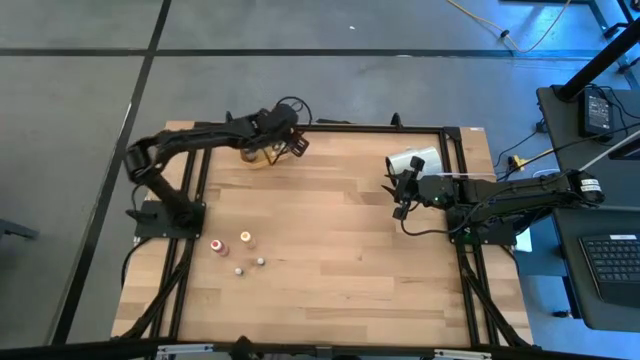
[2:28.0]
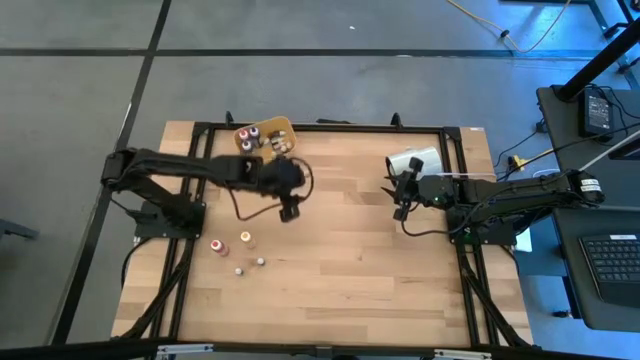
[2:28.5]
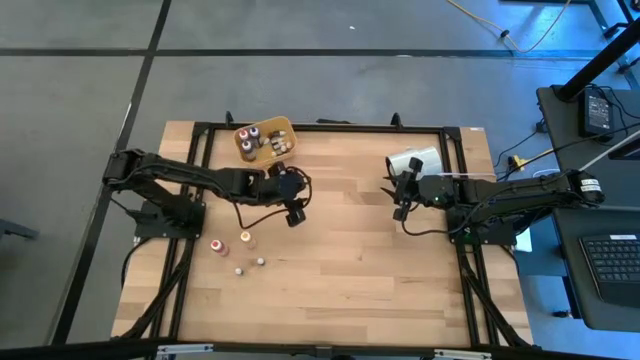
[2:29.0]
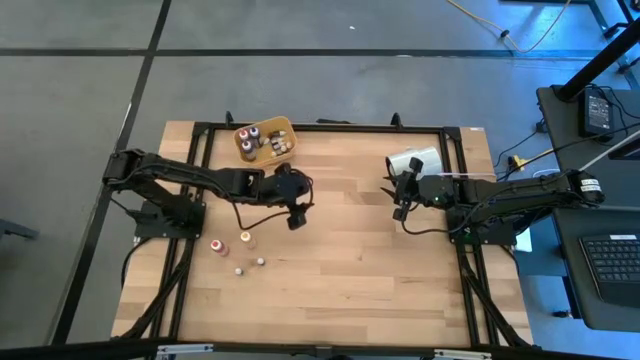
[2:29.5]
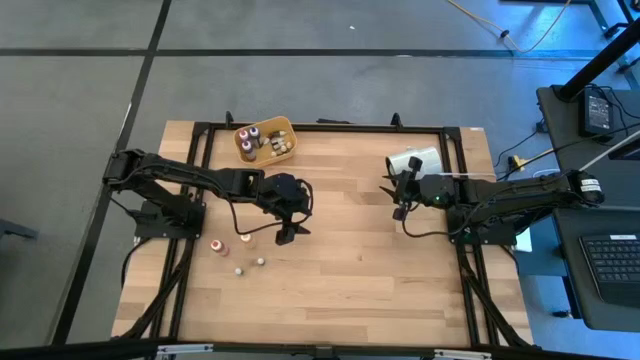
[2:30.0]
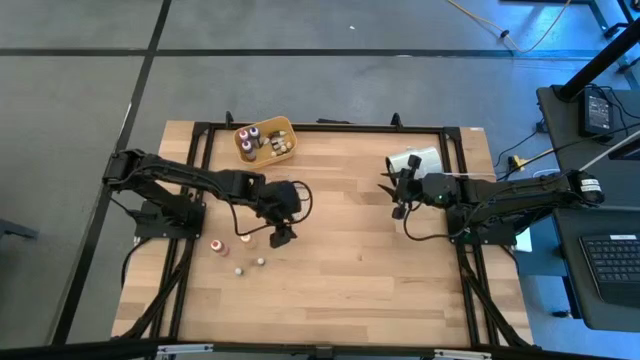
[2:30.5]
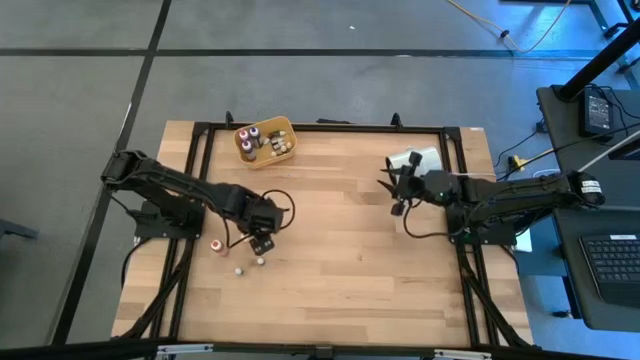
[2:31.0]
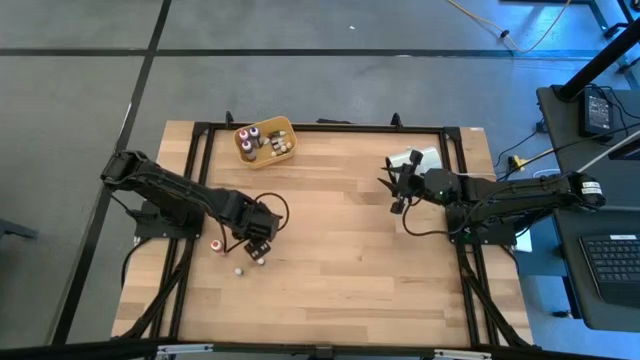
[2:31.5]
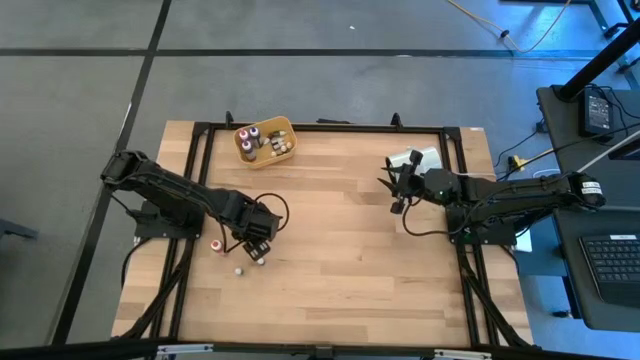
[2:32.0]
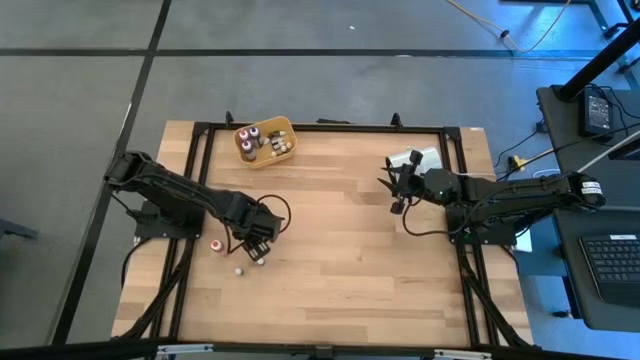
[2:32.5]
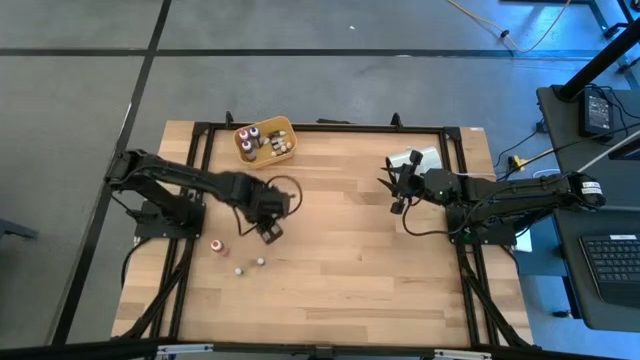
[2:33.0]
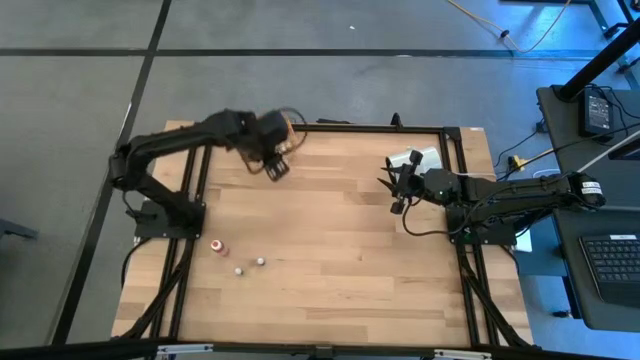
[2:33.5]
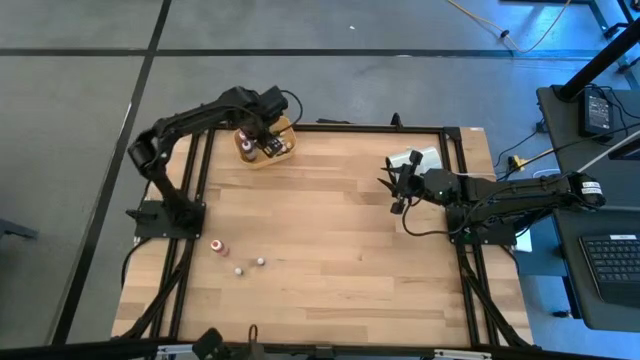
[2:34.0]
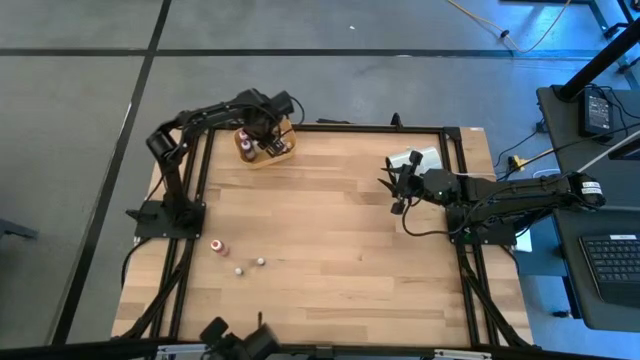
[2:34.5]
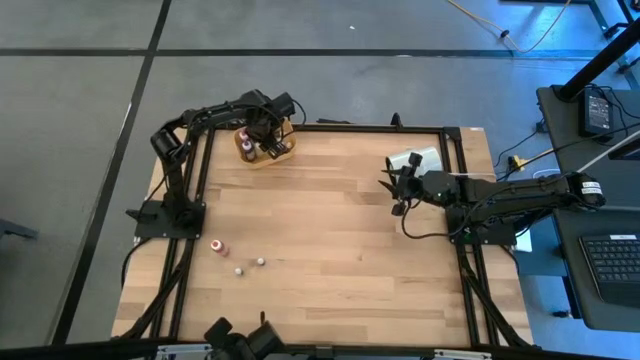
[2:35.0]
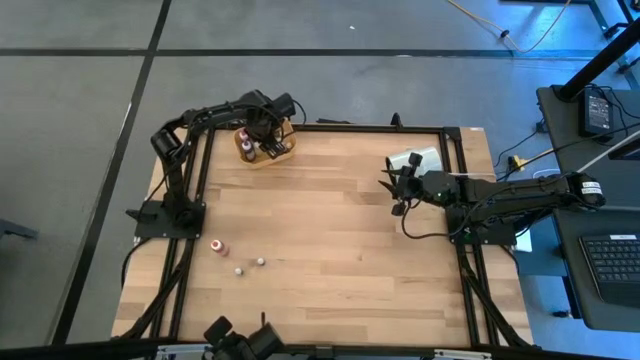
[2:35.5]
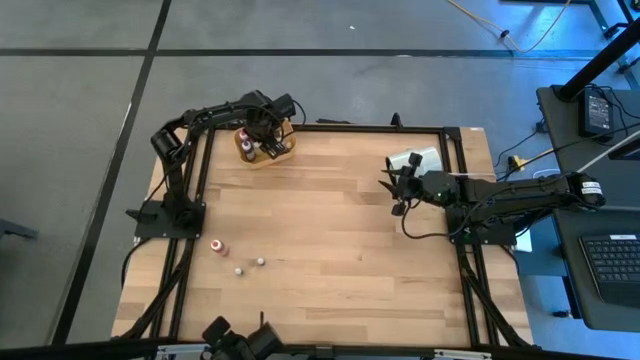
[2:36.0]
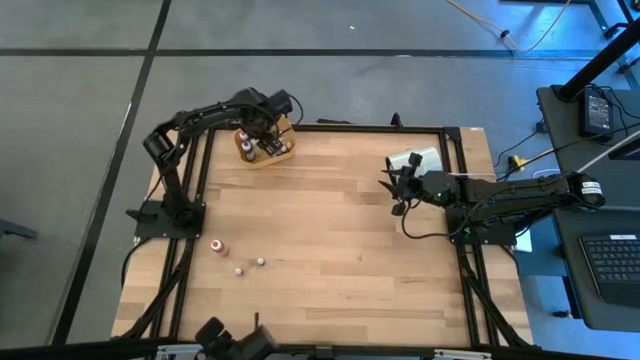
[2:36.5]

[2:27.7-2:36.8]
Task: Pick & Place food coloring
Put the large yellow food coloring bottle into the yellow bin

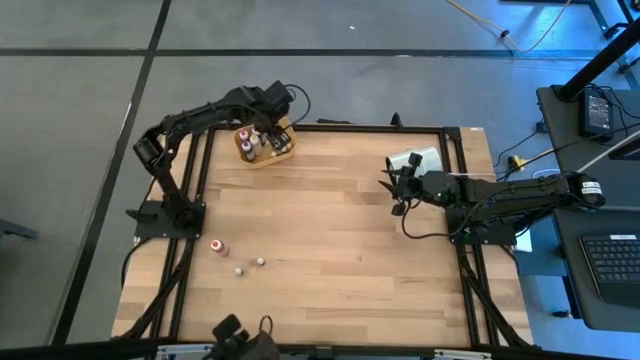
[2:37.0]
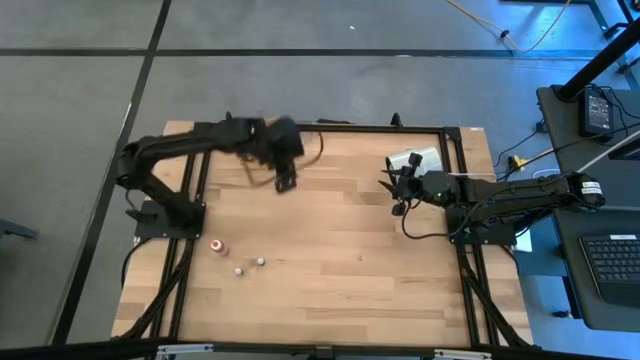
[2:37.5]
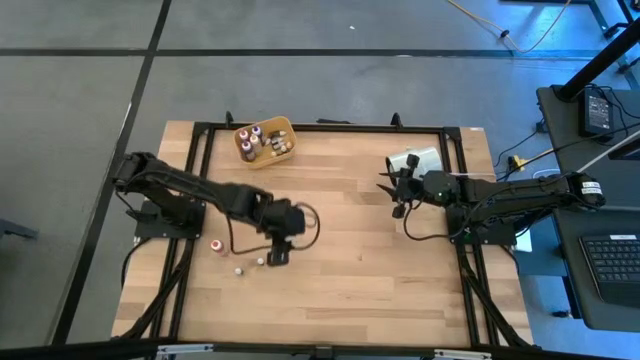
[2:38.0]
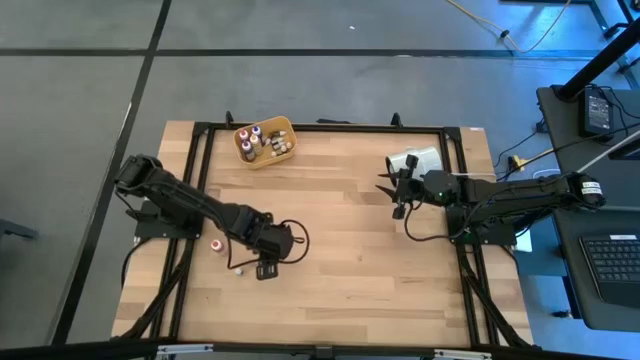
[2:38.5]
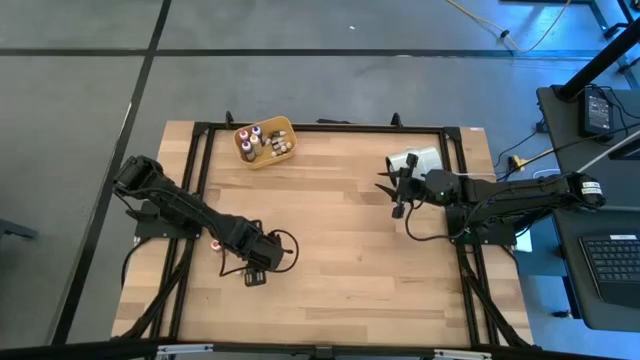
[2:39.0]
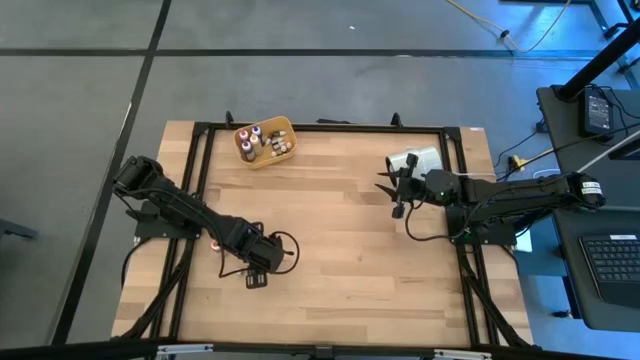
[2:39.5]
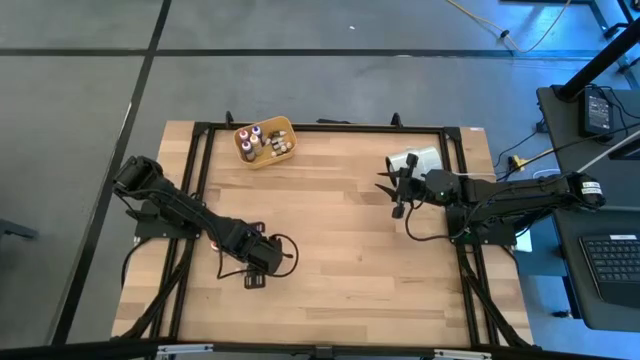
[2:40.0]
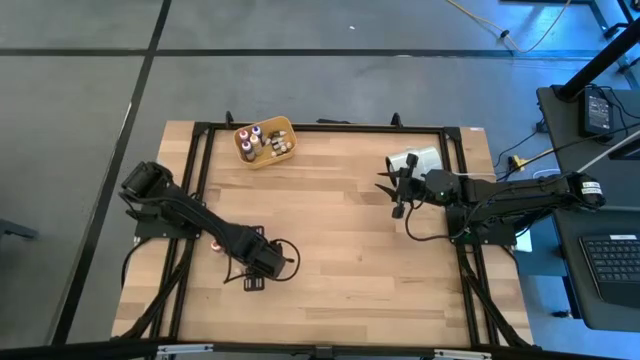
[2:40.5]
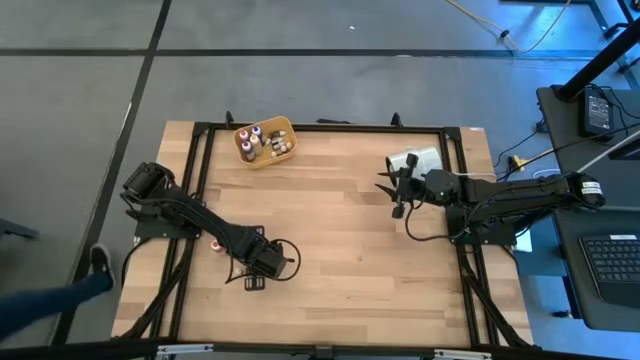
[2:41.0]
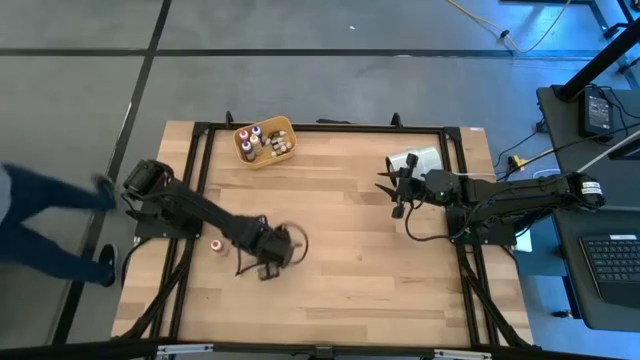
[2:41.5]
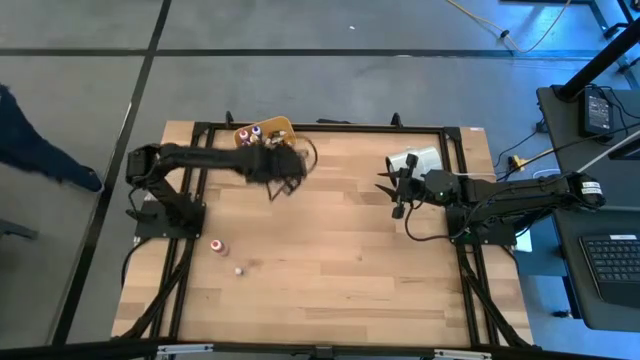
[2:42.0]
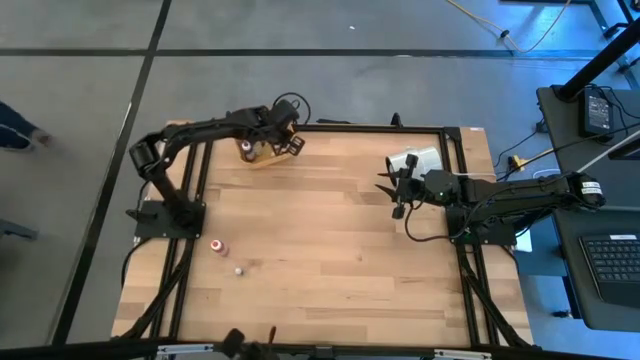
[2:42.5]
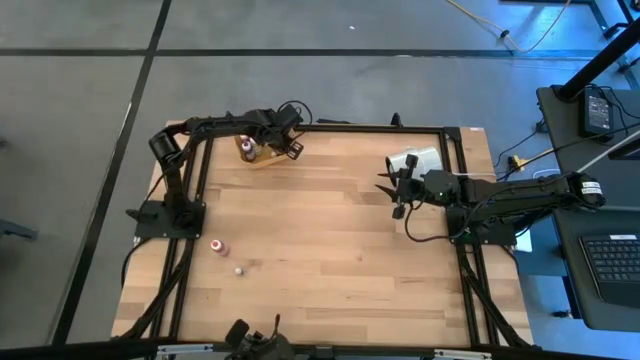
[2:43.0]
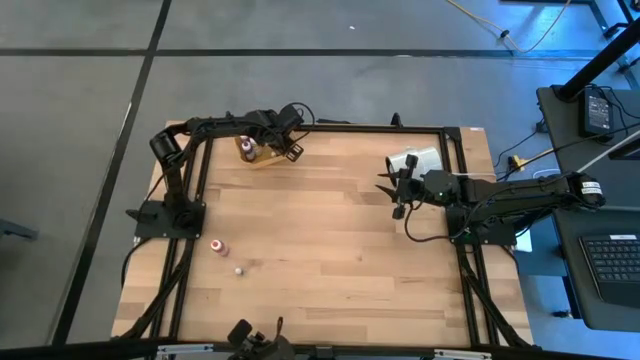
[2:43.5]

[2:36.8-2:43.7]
Put the small pink food coloring bottle into the yellow bin

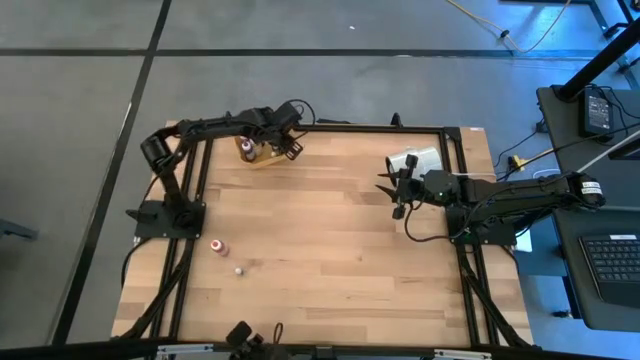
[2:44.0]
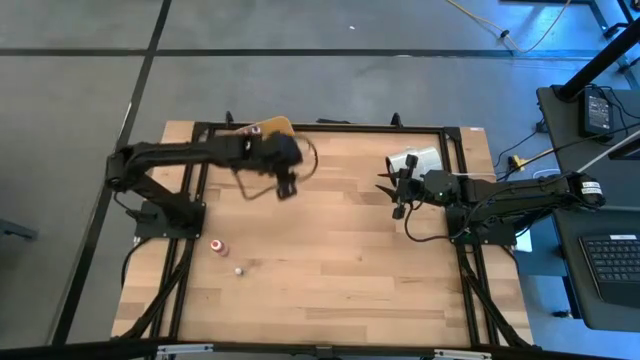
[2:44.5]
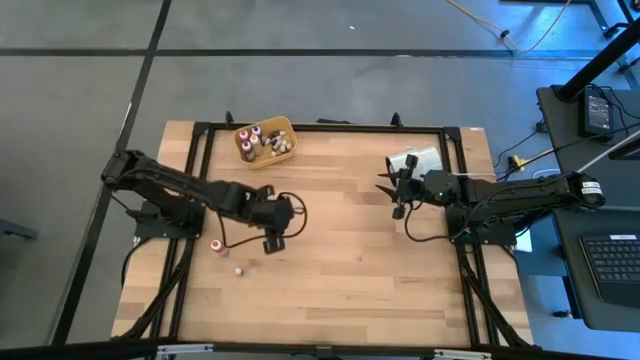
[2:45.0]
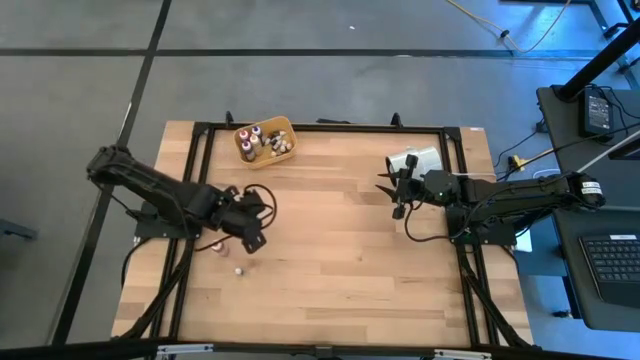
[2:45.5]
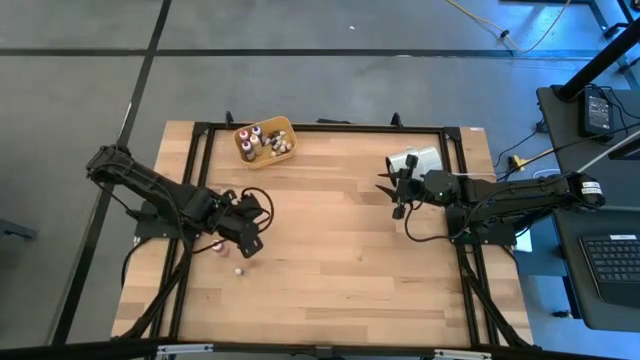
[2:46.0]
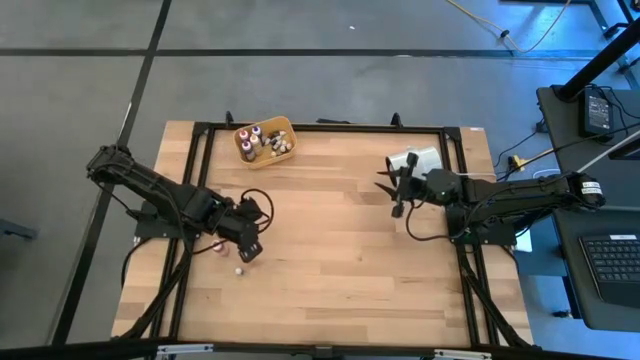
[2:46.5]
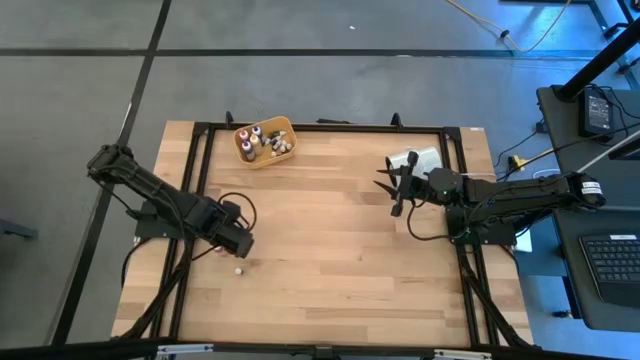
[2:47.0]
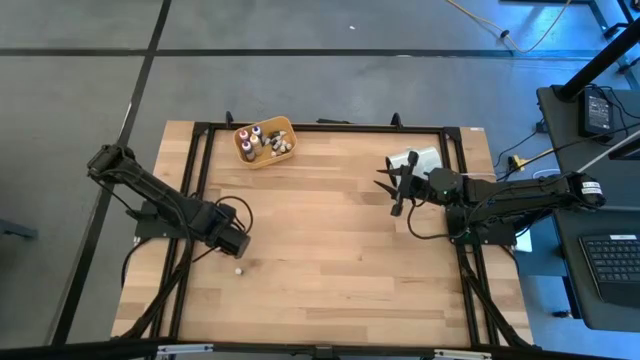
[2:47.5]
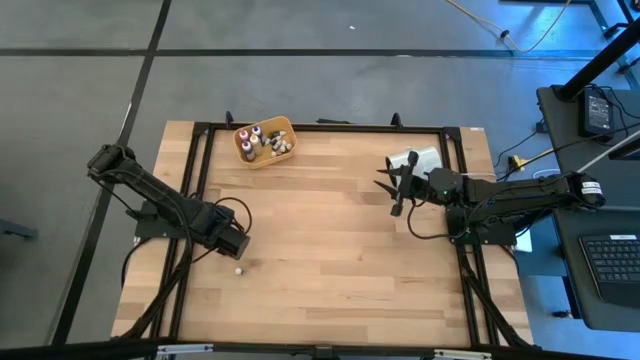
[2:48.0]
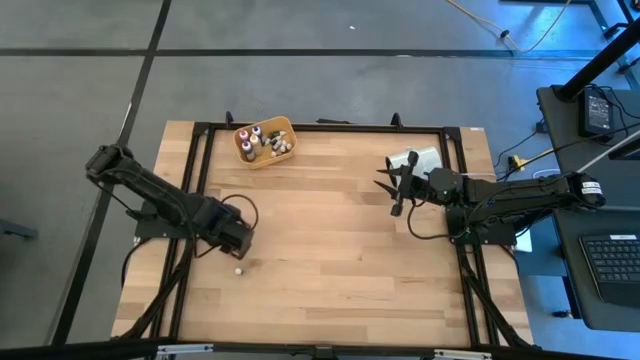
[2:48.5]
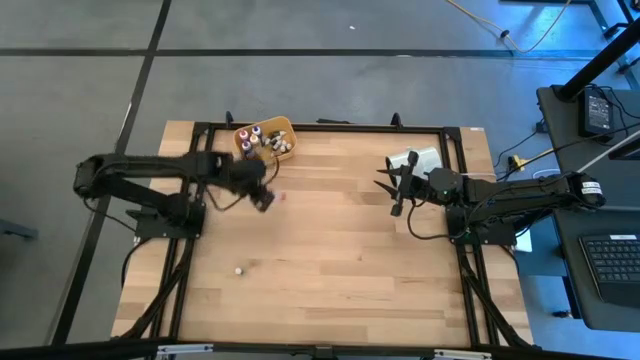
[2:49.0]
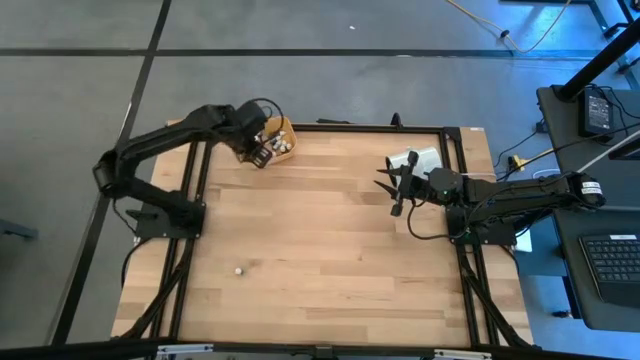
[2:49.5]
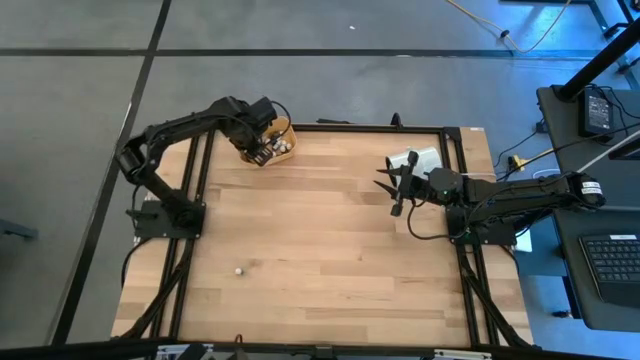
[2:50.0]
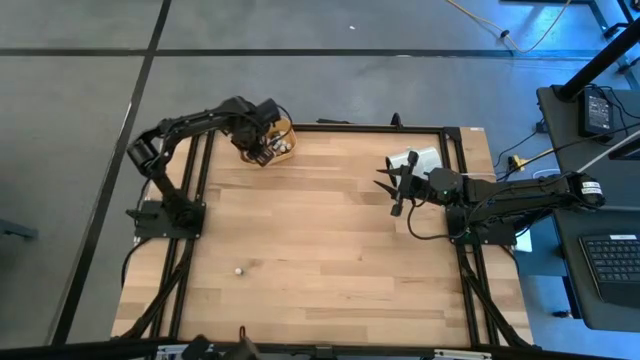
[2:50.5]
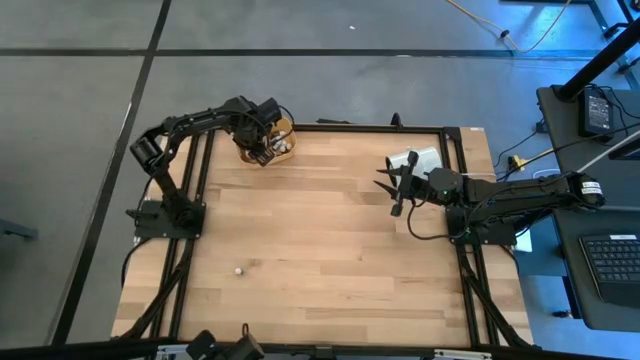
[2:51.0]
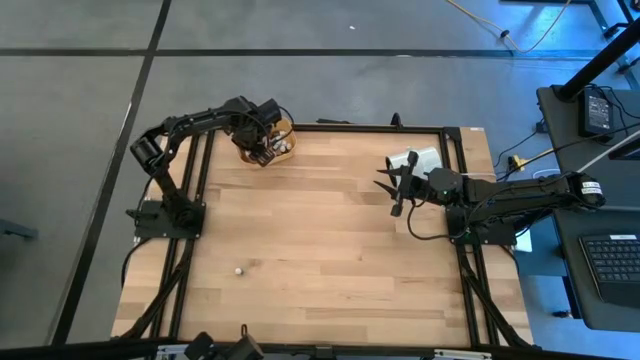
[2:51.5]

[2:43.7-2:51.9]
Put the large orange food coloring bottle into the yellow bin
